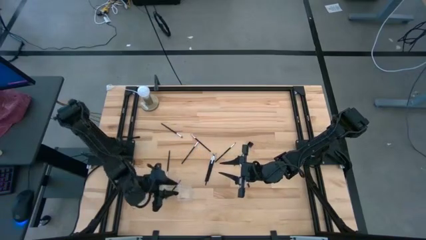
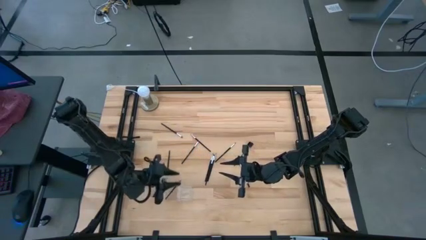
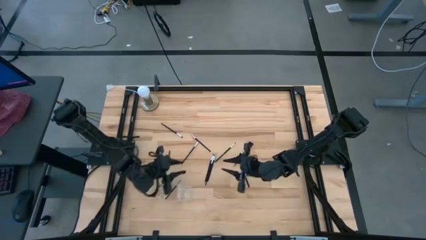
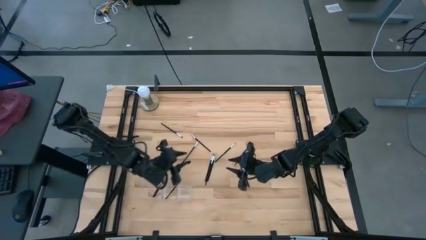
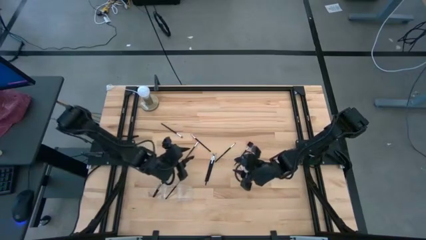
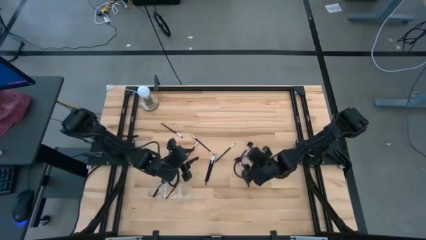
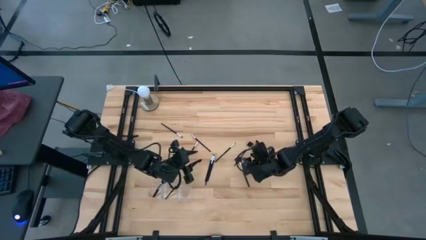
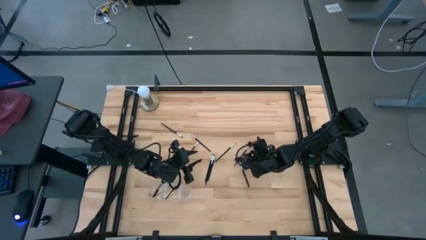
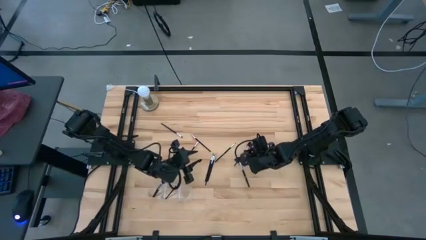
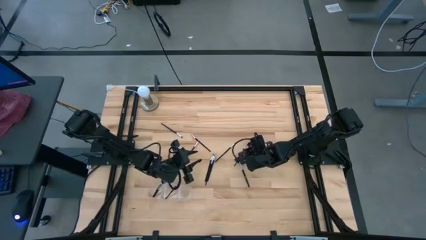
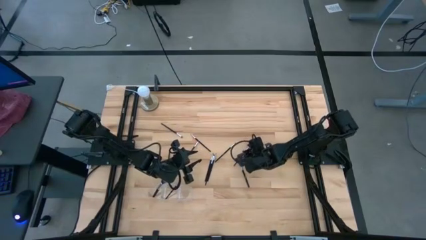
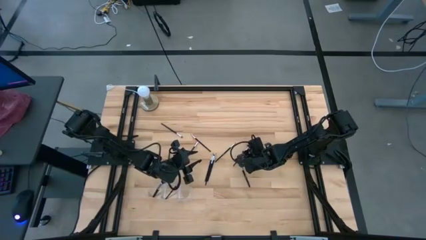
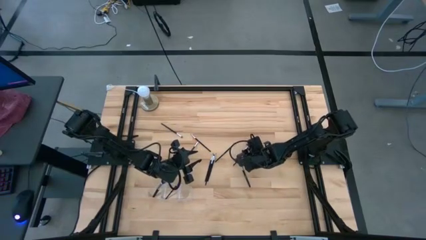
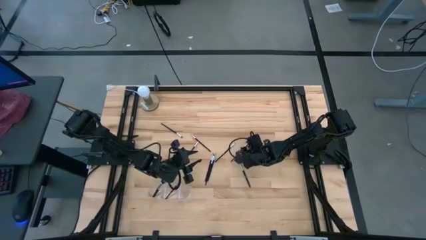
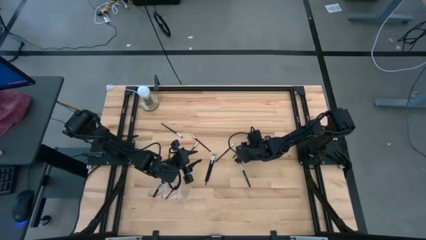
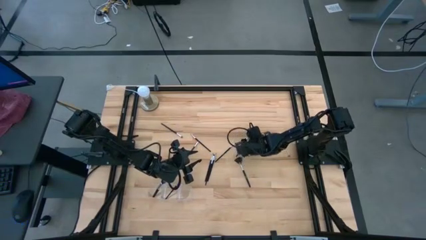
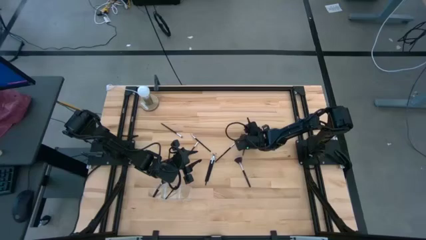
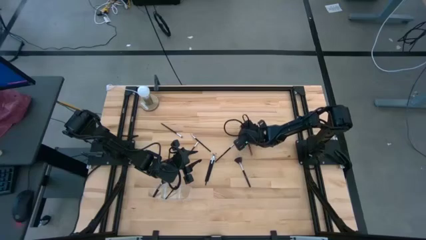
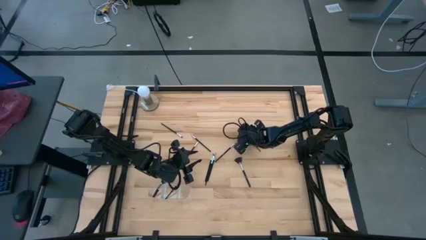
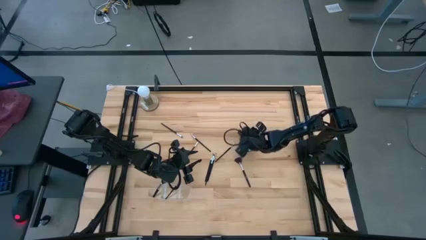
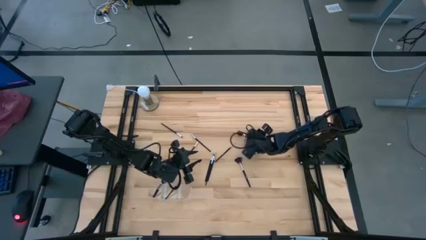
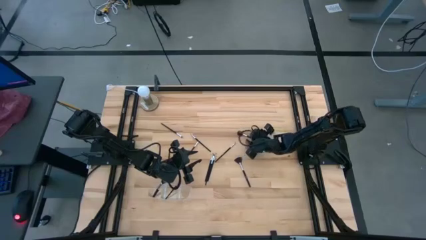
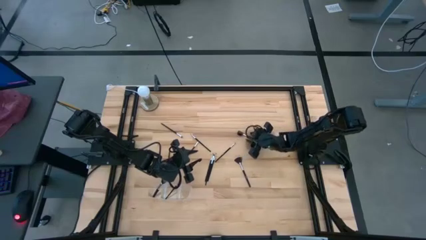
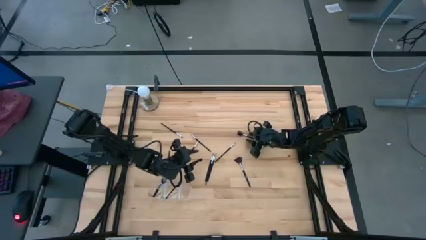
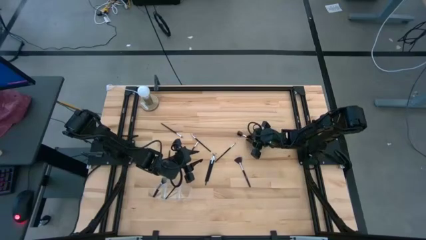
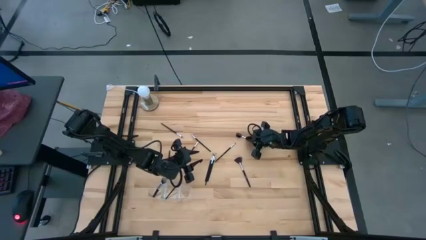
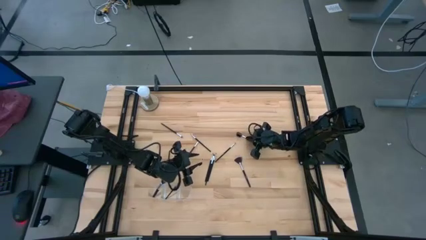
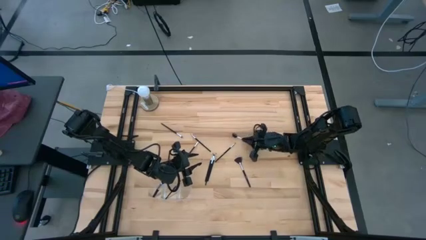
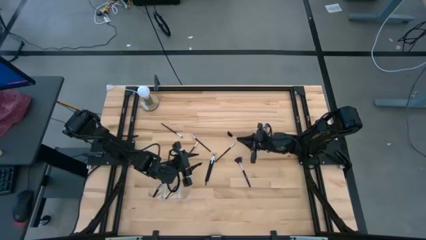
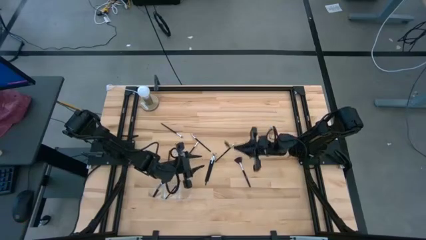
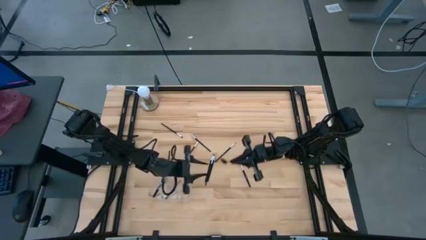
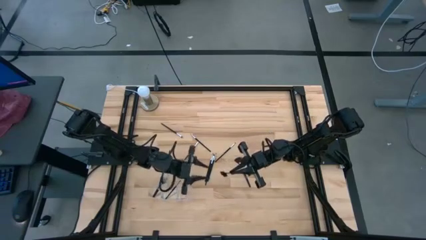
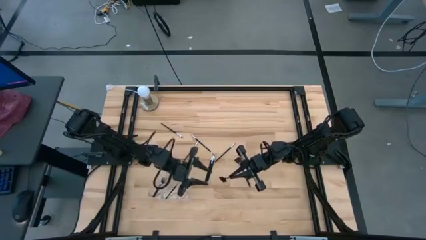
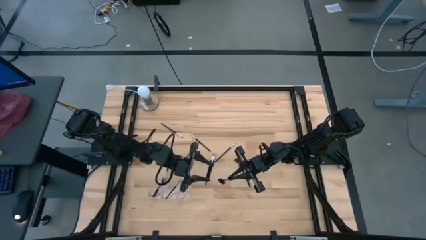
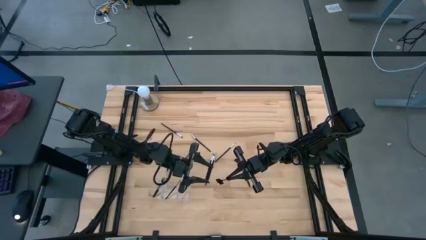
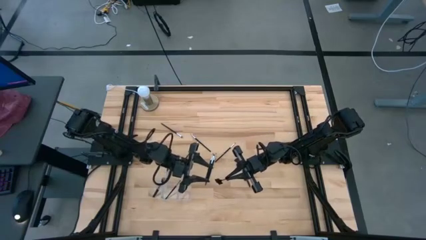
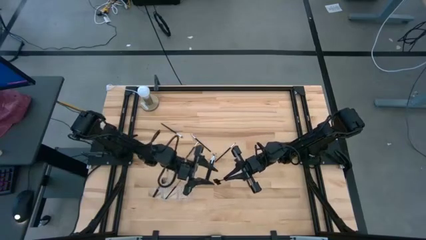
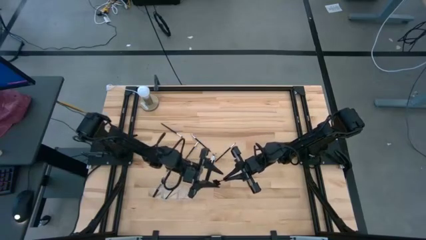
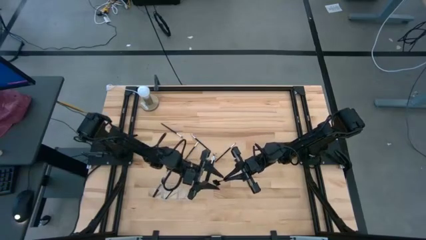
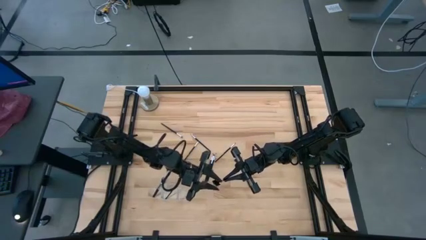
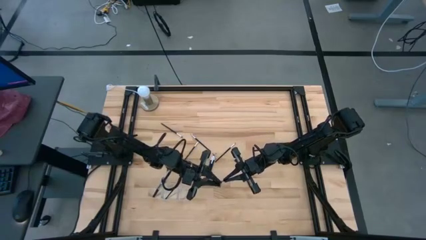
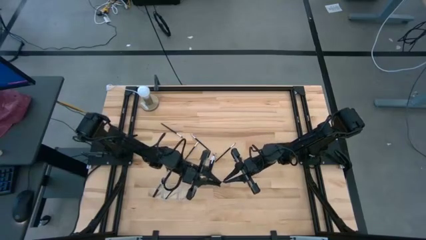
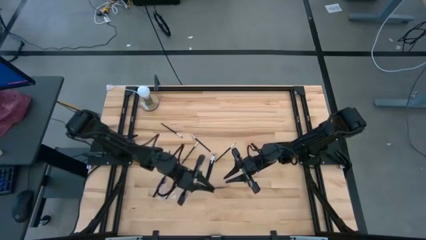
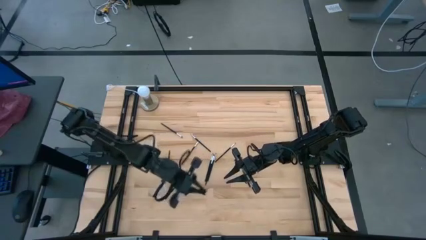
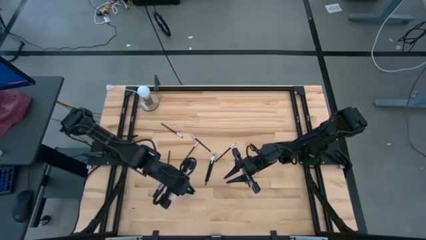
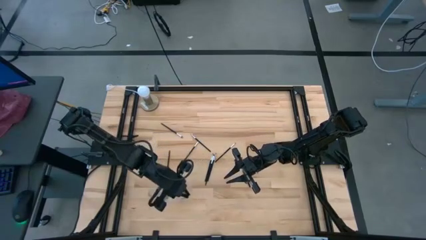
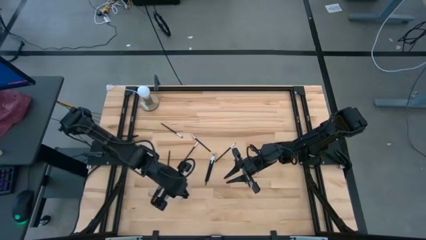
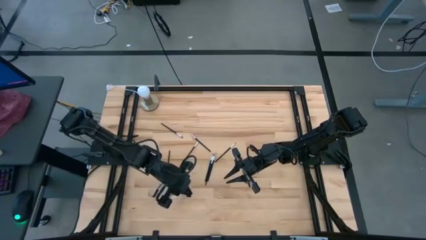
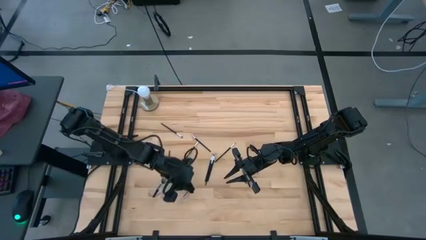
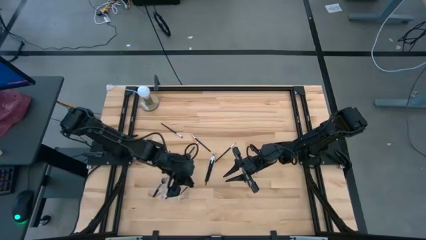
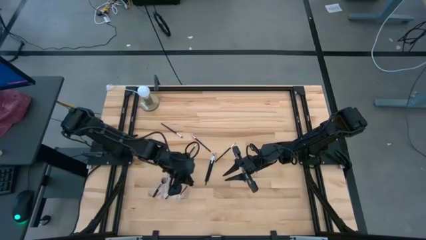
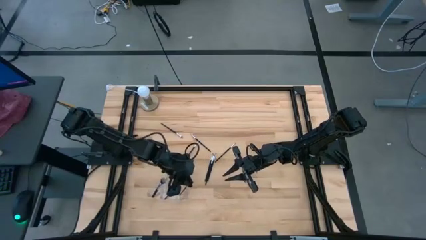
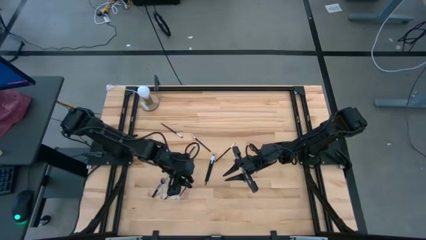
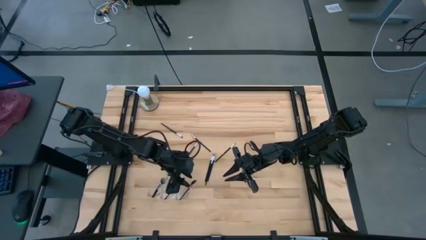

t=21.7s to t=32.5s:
Task: Put items in baskets/containers
Put the black lash brush into the transparent organizer

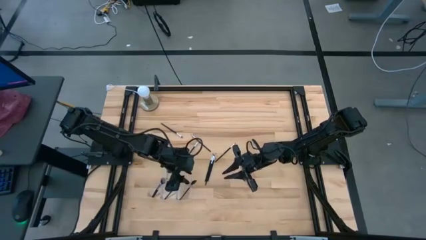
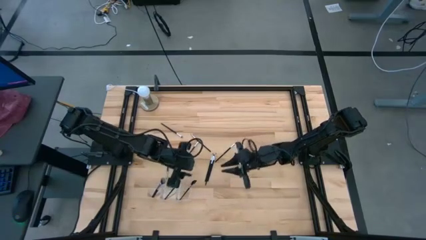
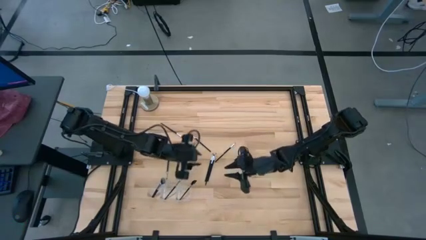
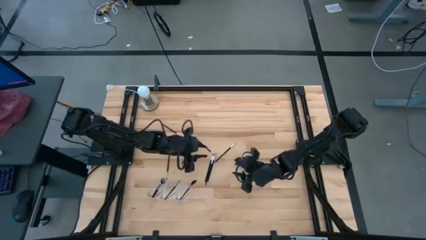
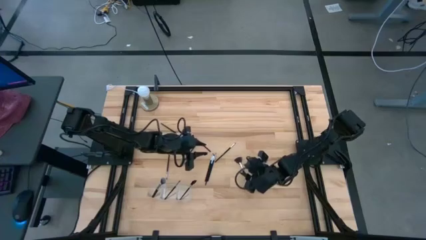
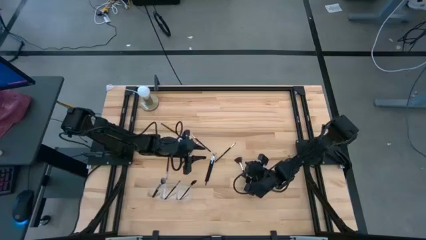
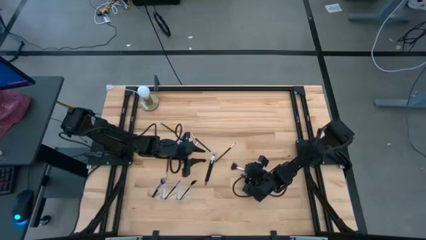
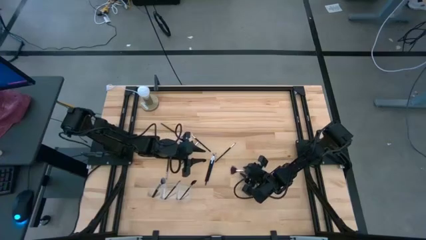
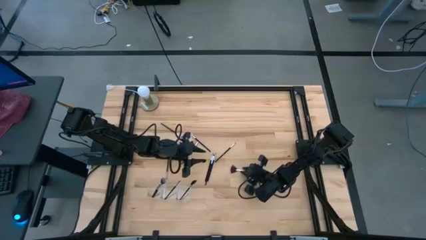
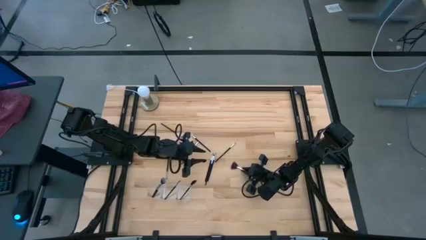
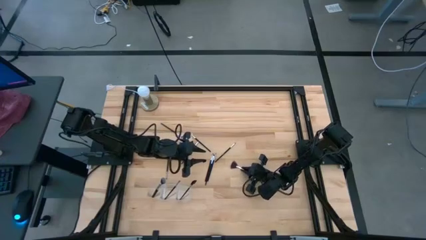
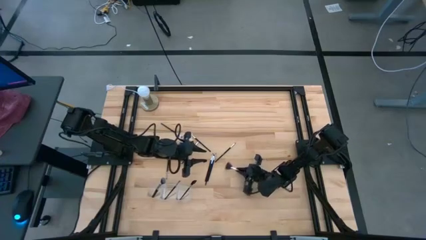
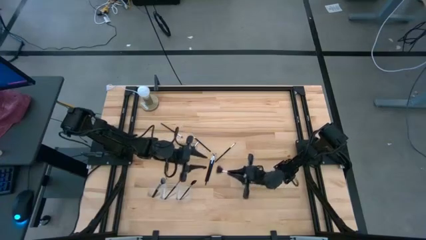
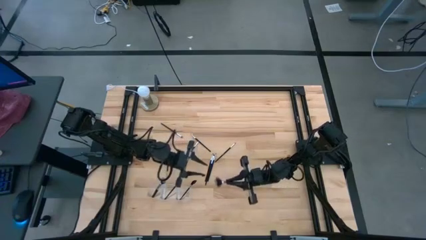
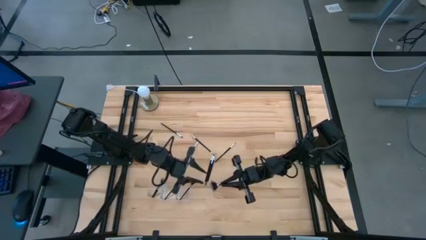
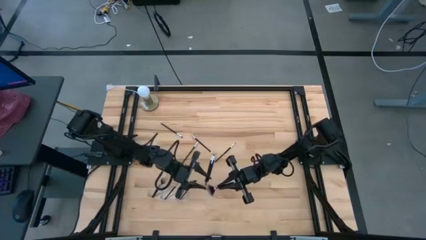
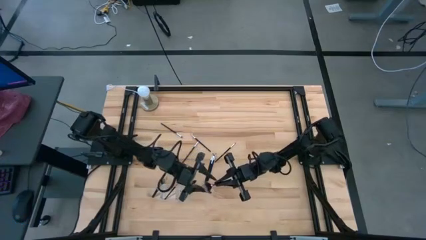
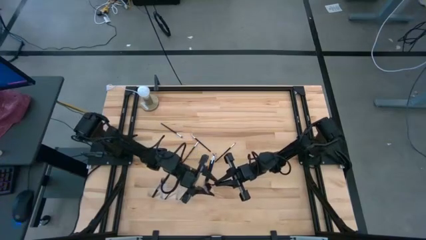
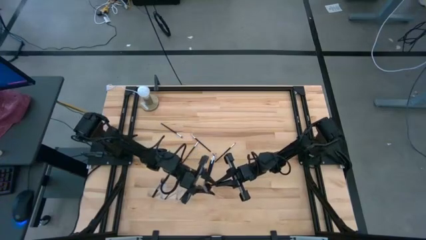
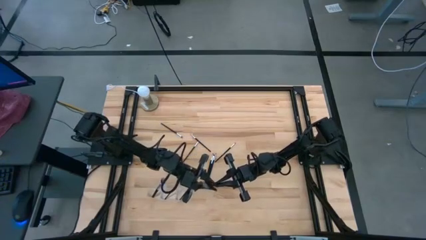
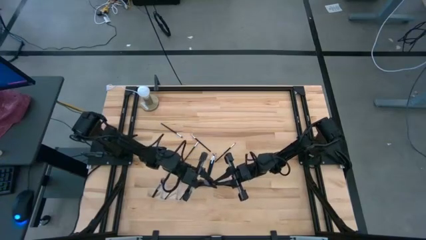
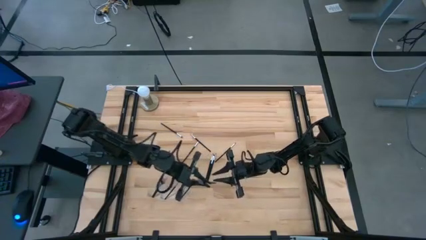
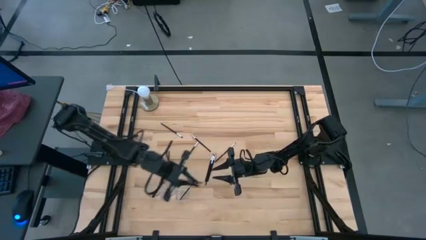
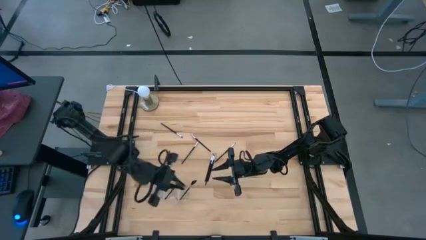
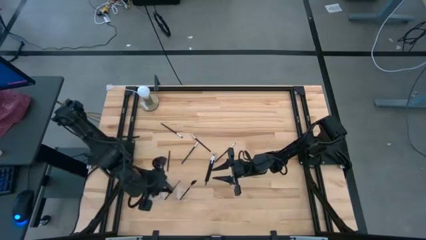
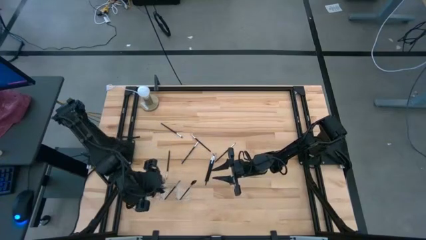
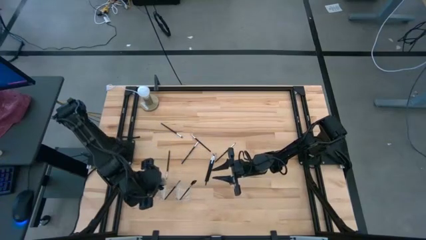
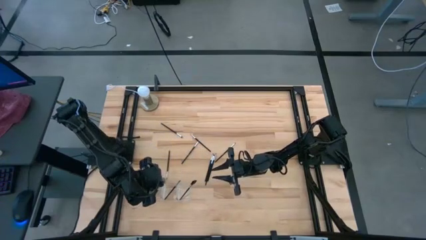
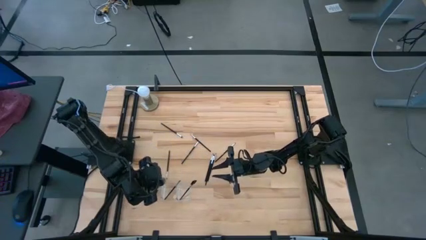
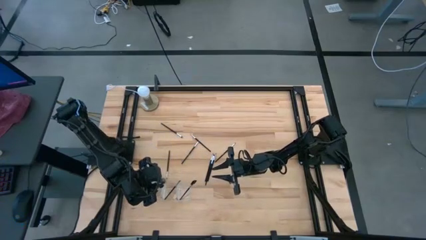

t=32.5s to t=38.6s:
Put the black highlighter brush into the transparent organizer
